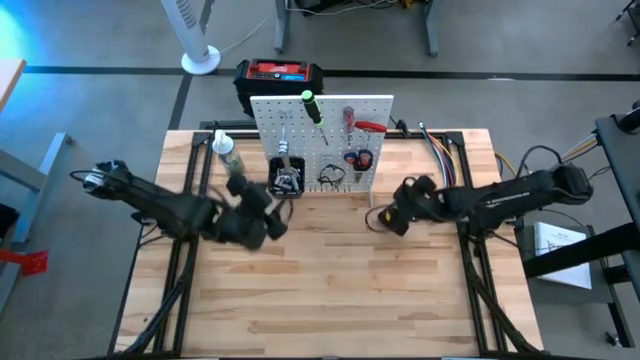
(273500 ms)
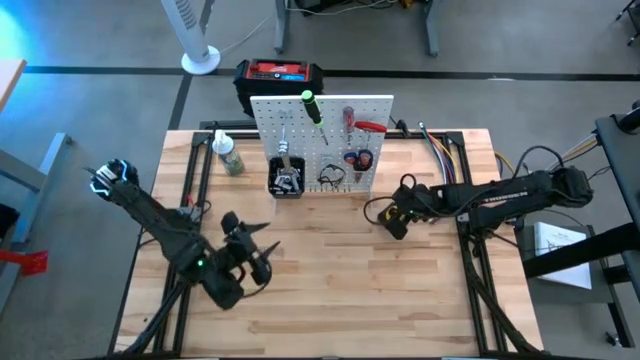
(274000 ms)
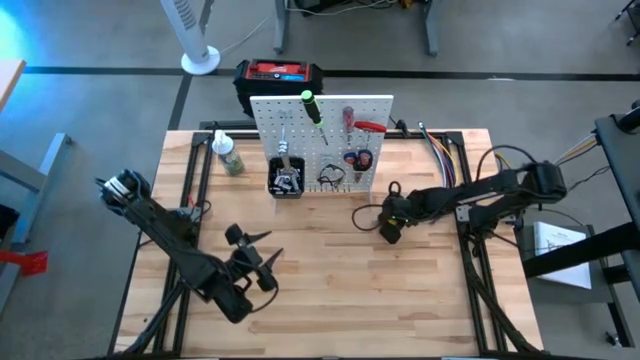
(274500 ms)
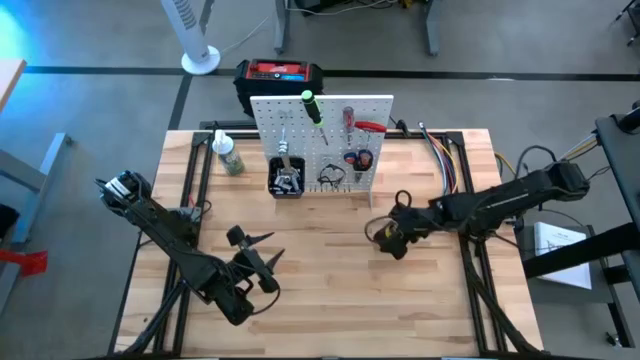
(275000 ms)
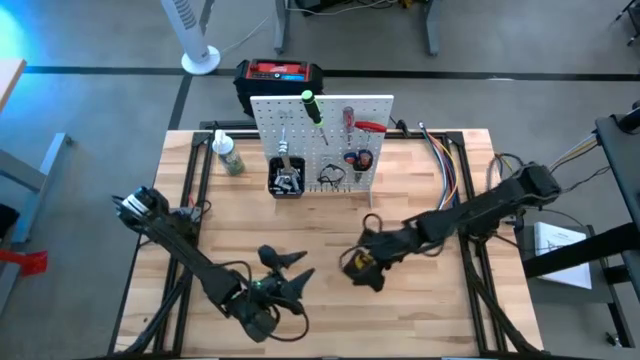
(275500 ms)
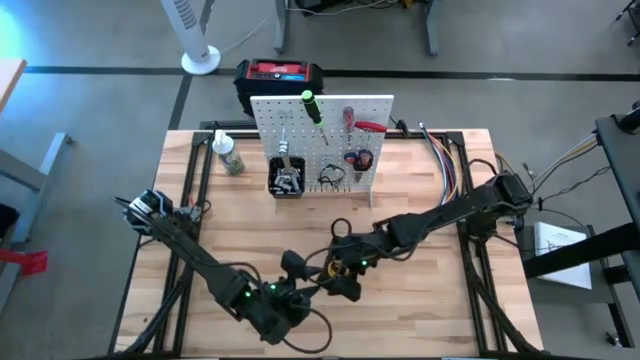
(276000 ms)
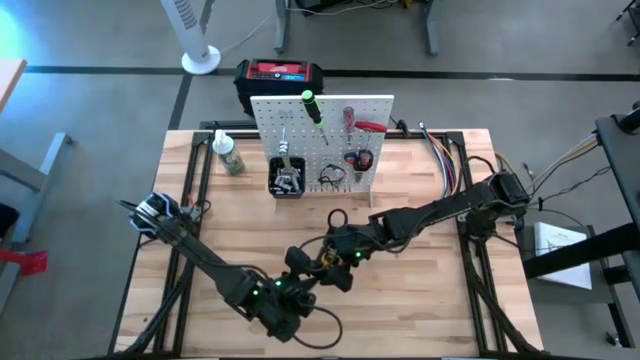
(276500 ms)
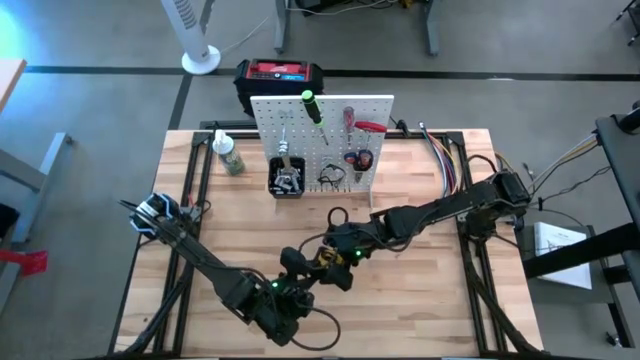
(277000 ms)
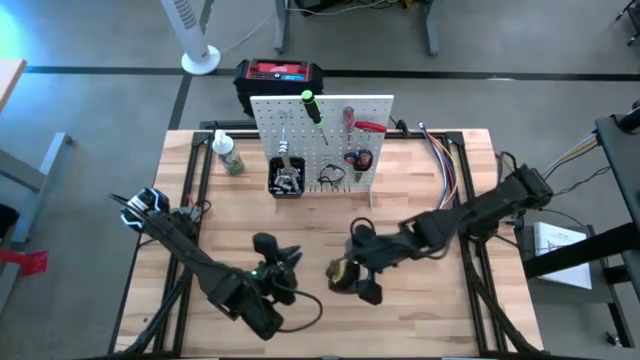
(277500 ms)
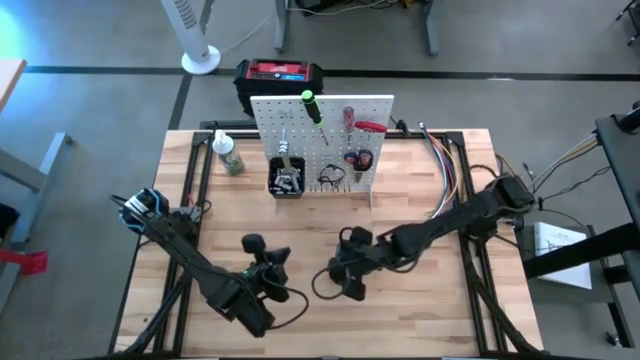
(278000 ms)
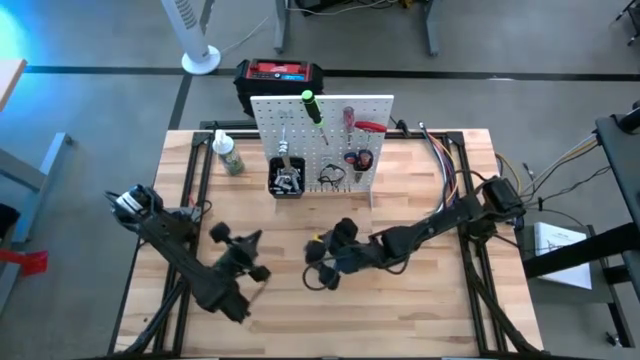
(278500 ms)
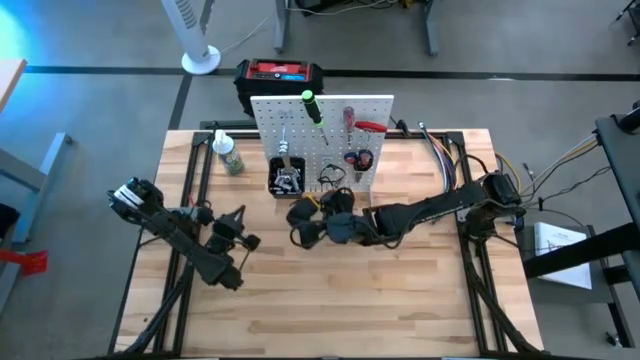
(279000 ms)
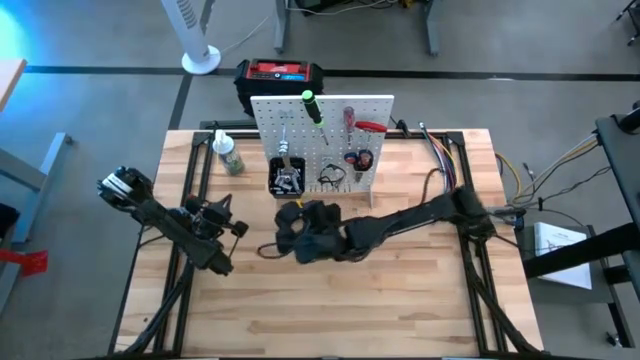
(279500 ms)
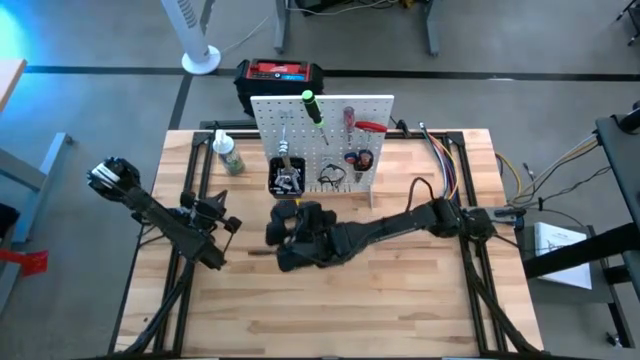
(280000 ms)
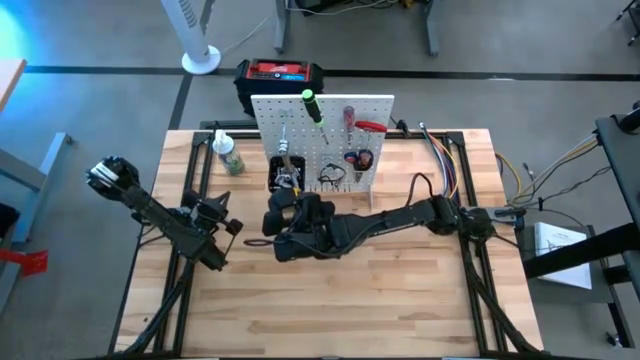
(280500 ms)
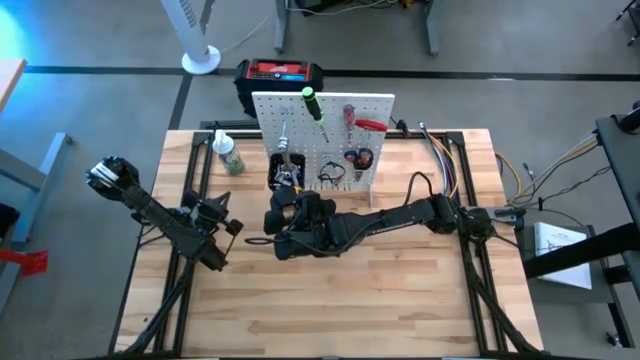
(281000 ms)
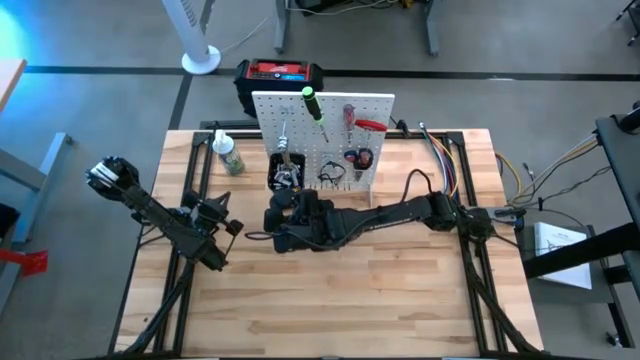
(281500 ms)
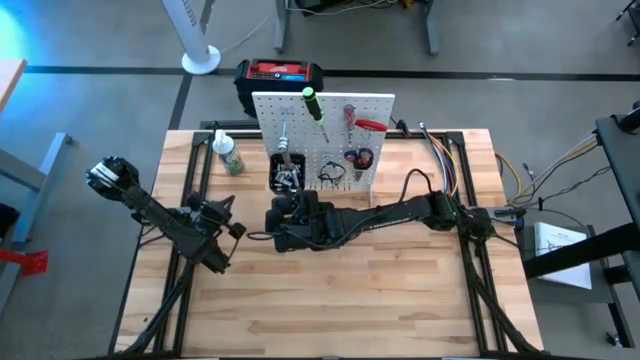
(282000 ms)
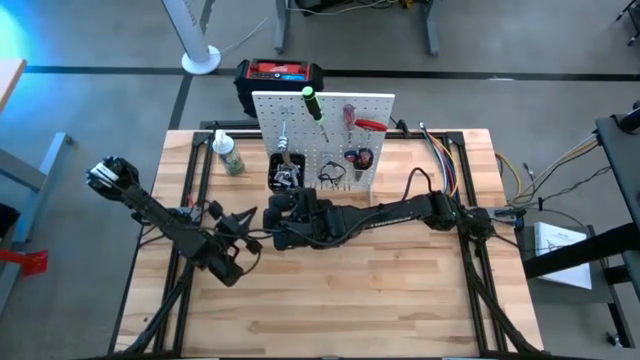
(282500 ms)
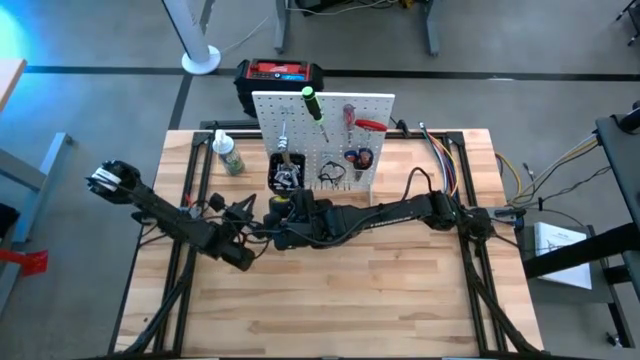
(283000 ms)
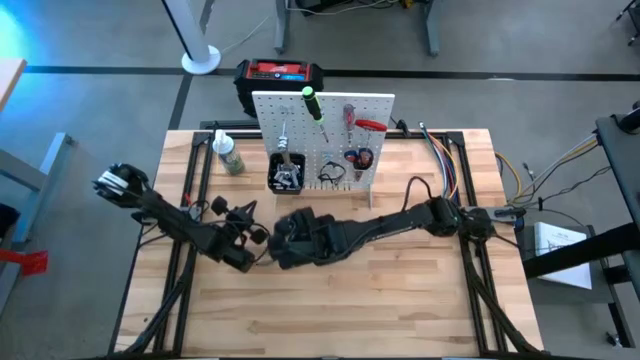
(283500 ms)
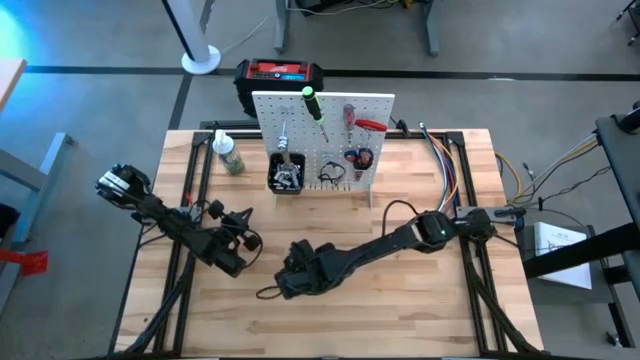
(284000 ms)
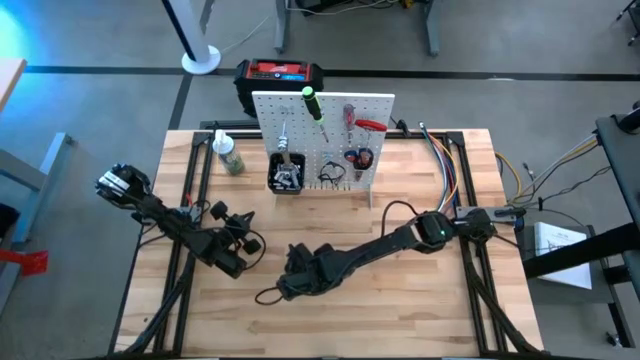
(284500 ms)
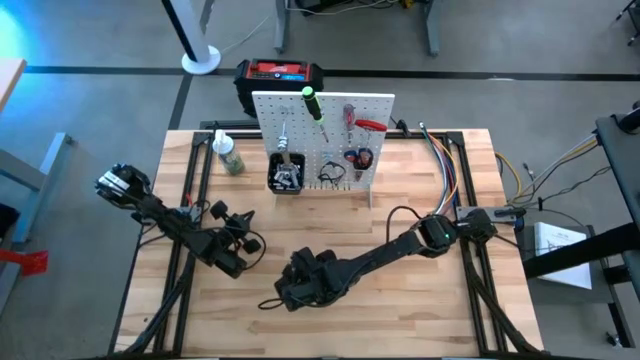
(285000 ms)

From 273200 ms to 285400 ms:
Task: Hang tools onto peg board
Hang the yellow measuring tape on the pegboard

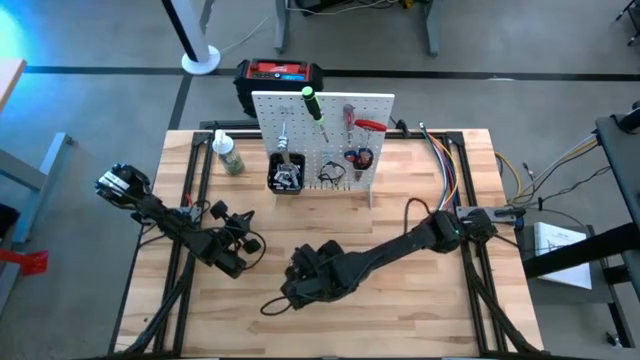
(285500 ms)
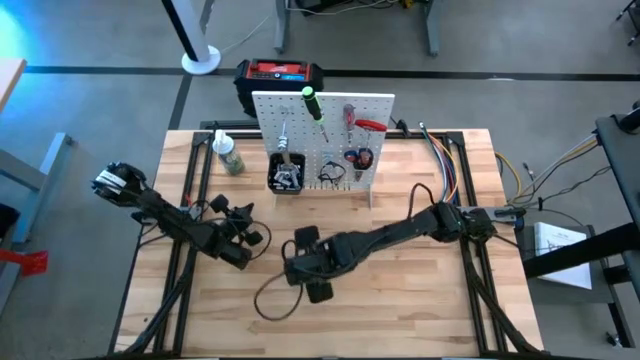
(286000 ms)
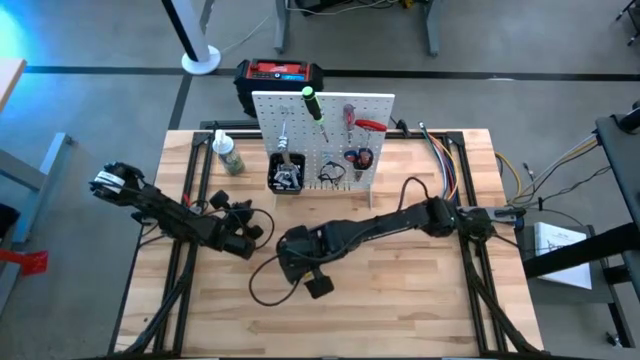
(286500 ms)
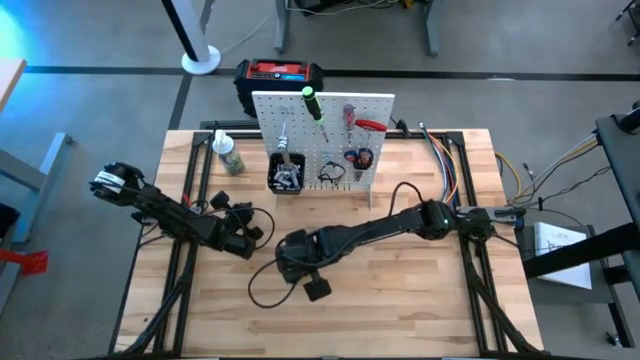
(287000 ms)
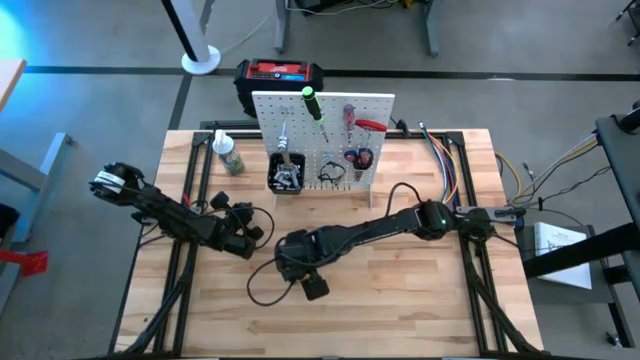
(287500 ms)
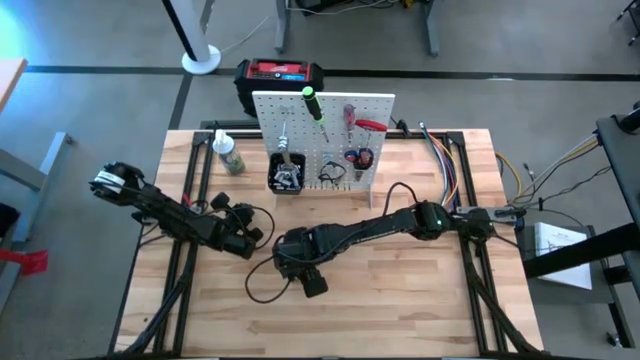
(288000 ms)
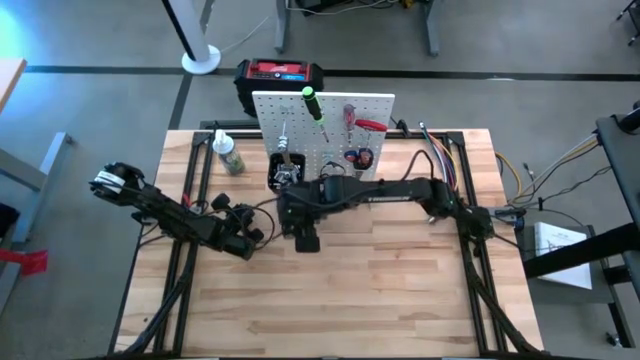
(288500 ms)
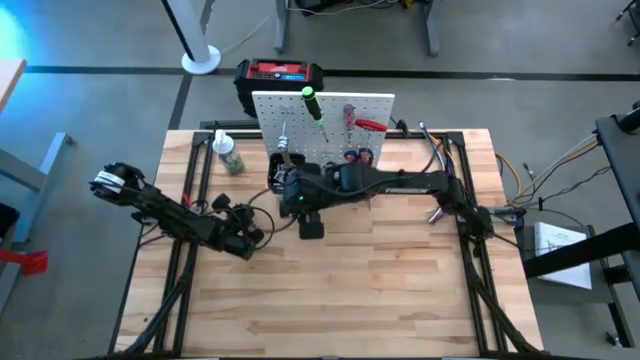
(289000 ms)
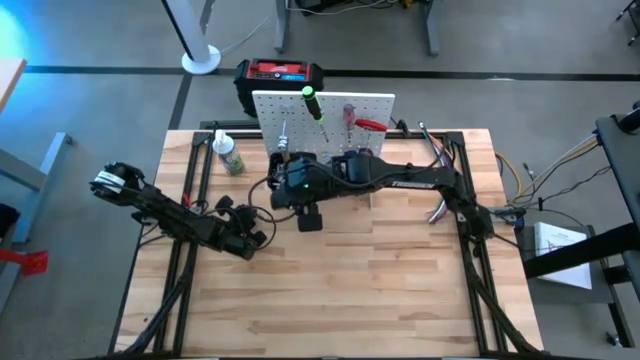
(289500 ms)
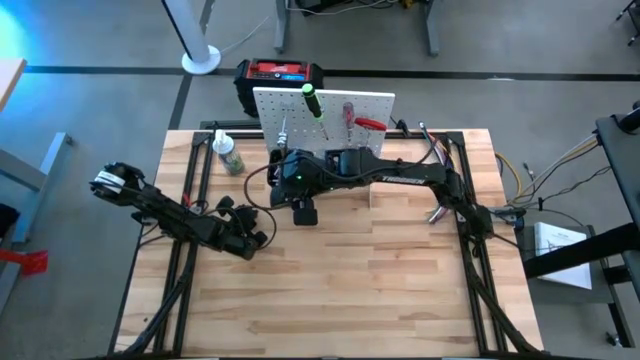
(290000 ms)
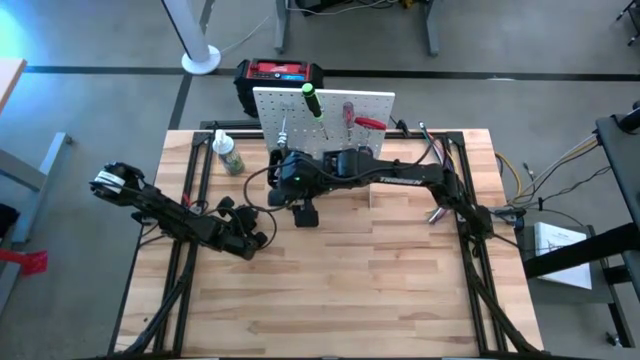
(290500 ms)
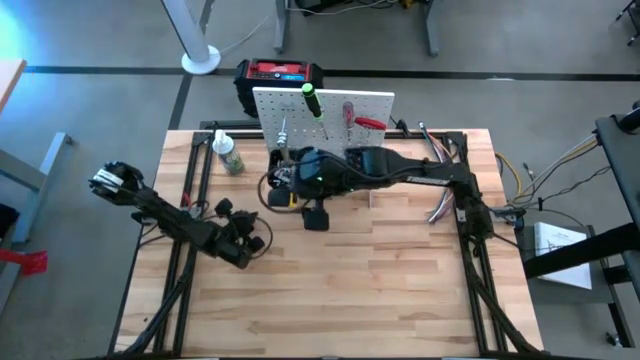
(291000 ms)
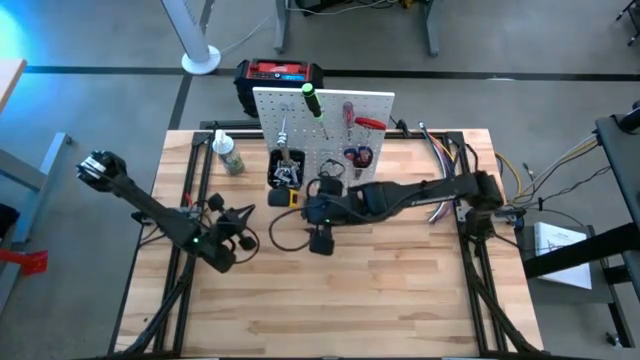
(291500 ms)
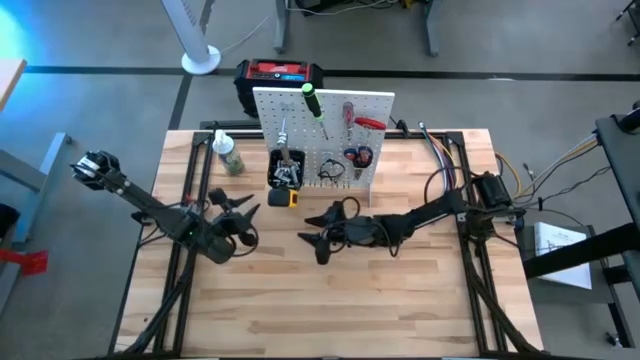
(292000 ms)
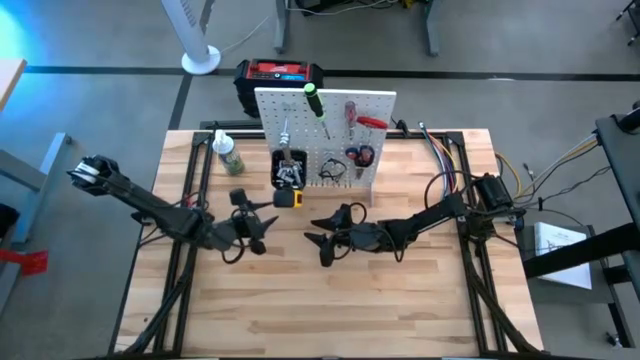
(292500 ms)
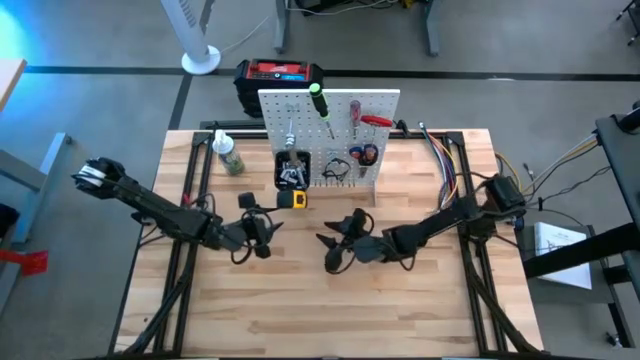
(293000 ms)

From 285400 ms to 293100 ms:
Hang the measuring tape on the pegboard

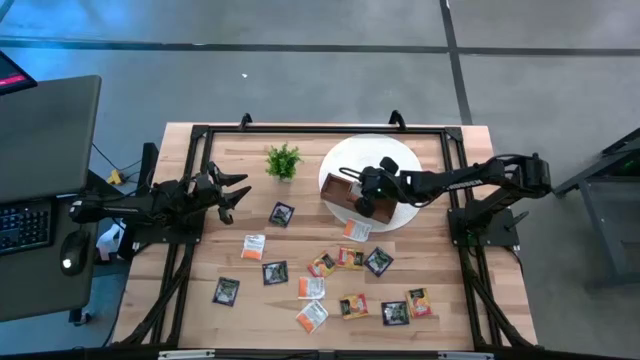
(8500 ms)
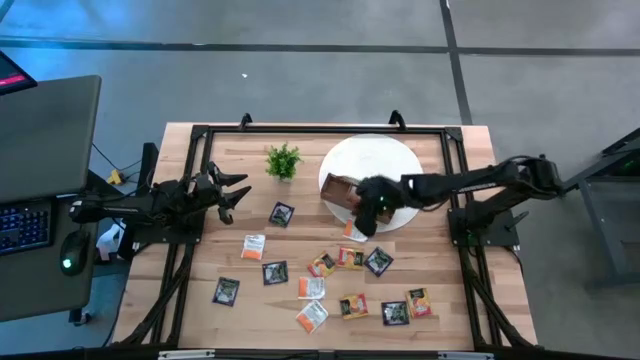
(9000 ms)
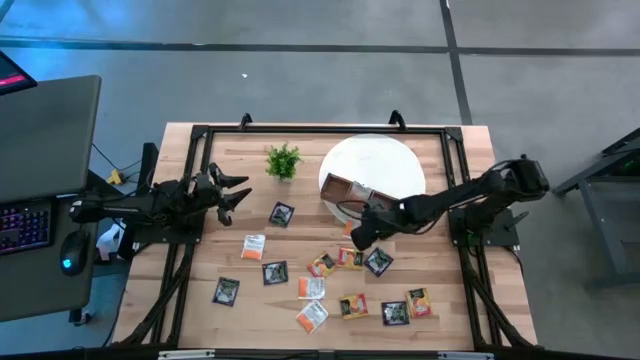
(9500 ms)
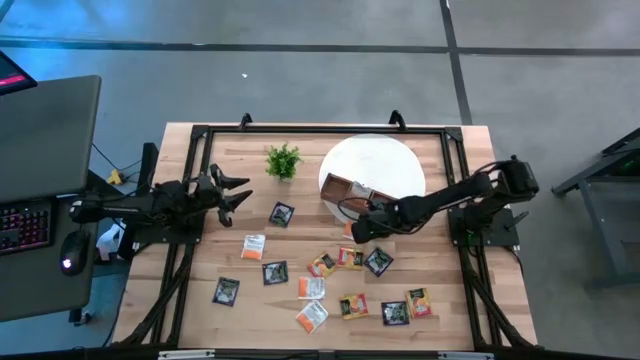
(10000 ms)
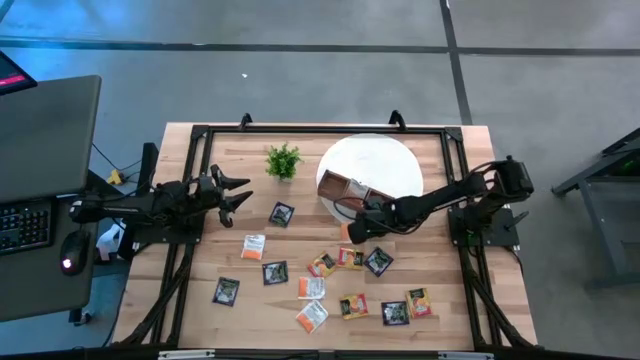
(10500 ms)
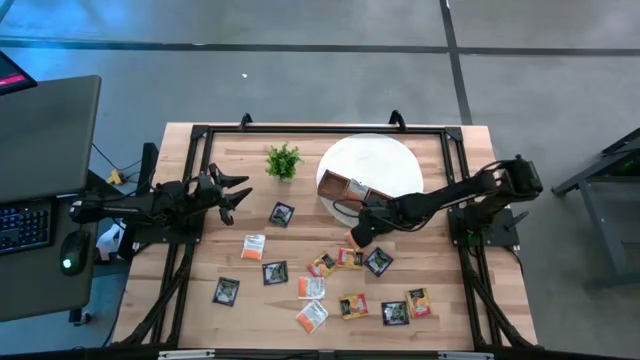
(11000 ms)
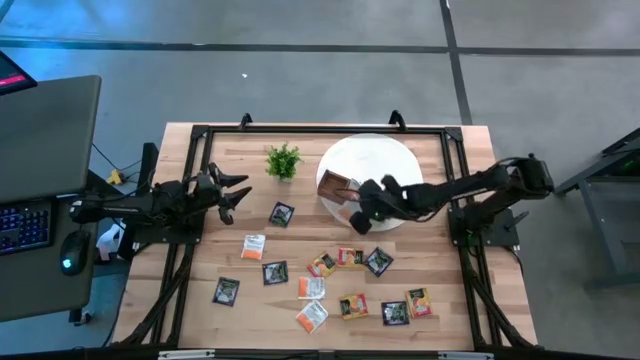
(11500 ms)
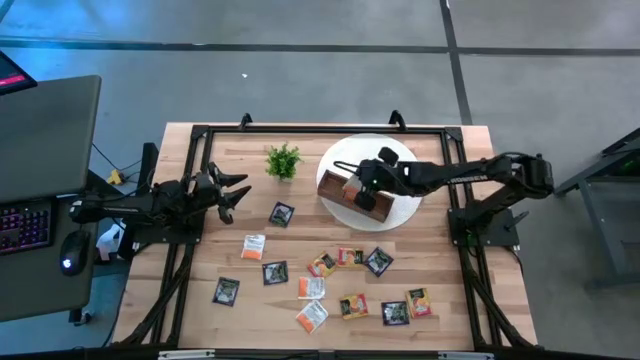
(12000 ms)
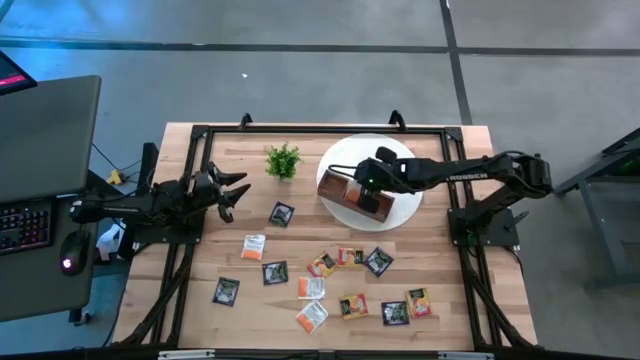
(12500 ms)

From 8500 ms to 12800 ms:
Task: Pick & Place Tea
Put the white tea bag into the middle compartment of the wooden organizer
